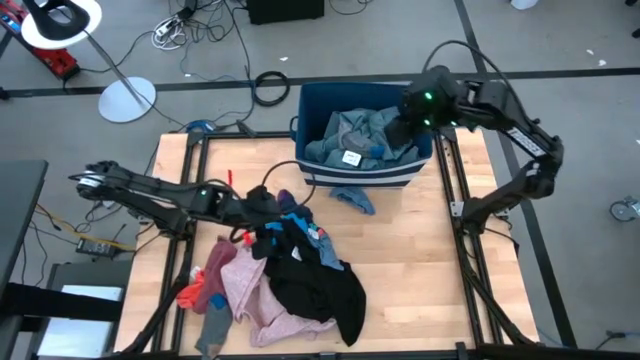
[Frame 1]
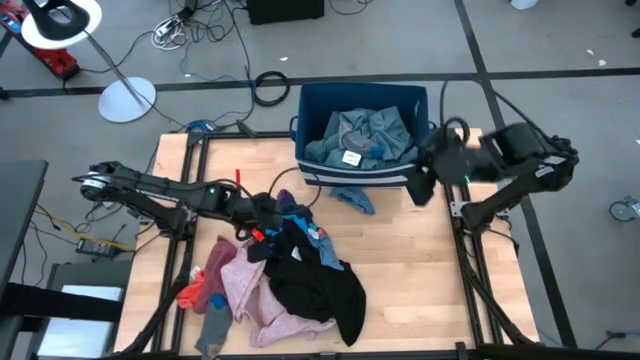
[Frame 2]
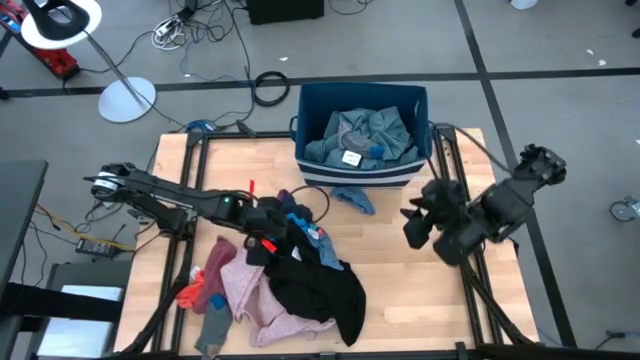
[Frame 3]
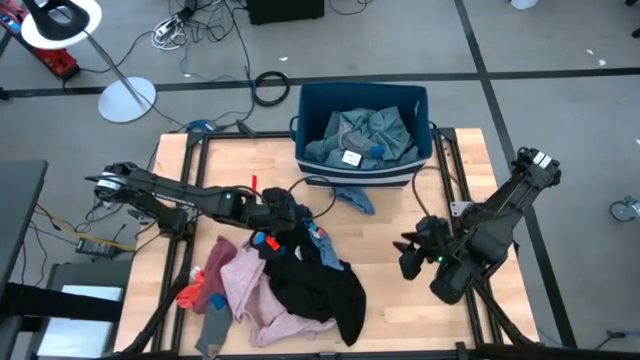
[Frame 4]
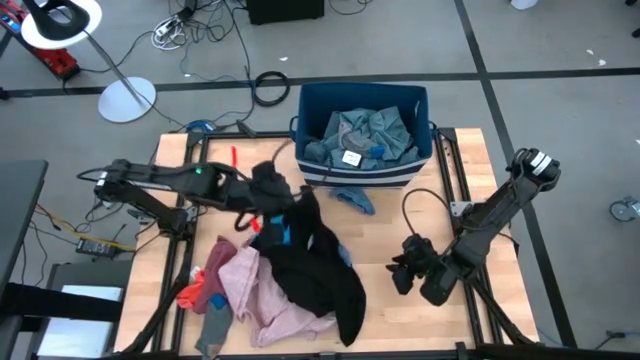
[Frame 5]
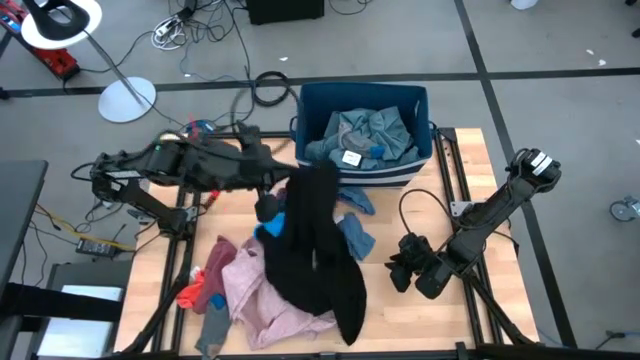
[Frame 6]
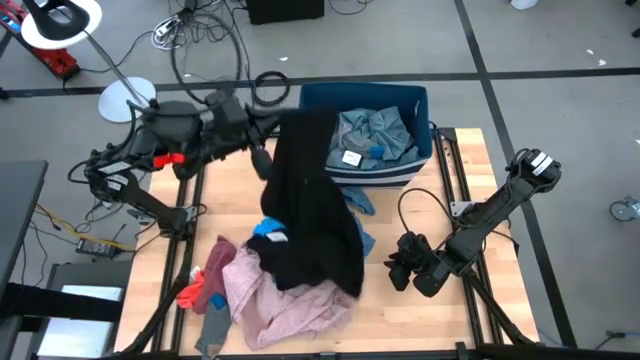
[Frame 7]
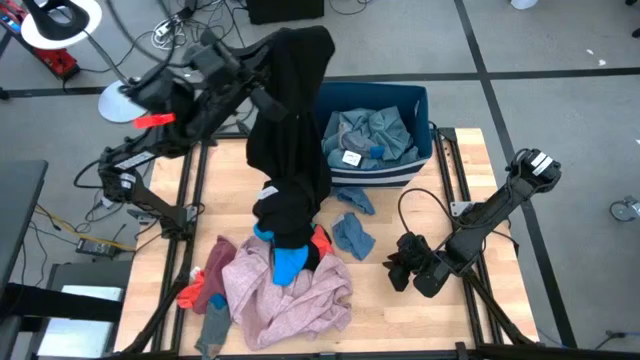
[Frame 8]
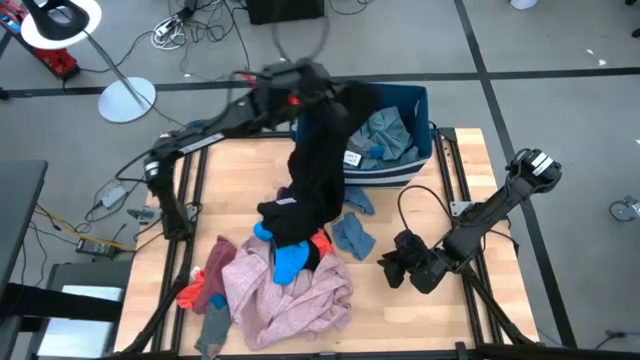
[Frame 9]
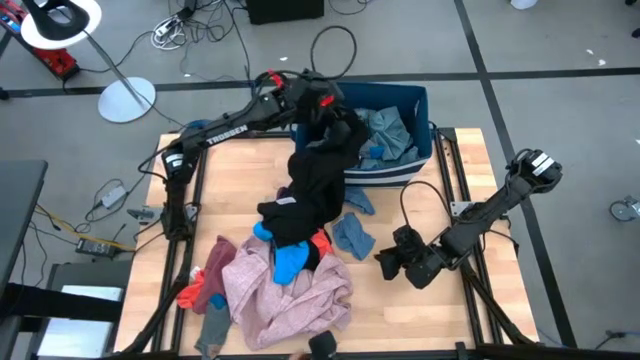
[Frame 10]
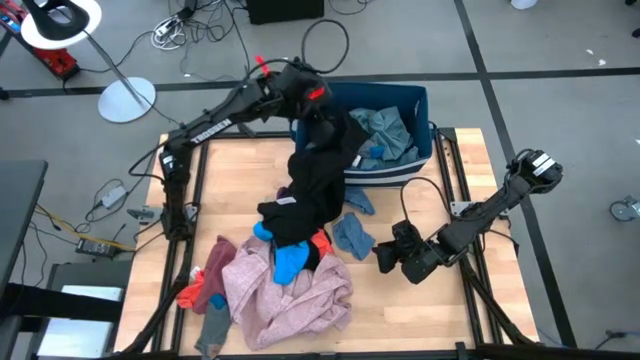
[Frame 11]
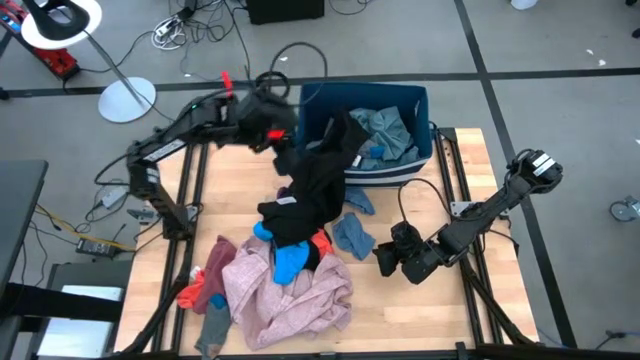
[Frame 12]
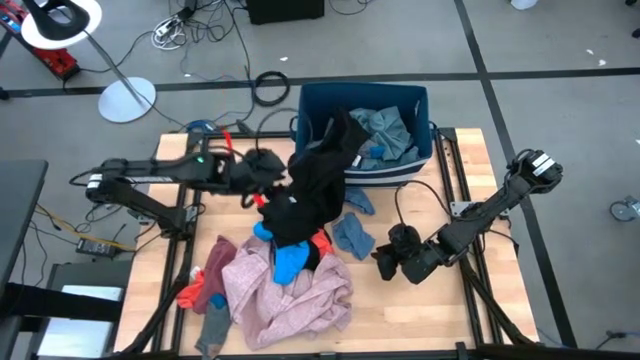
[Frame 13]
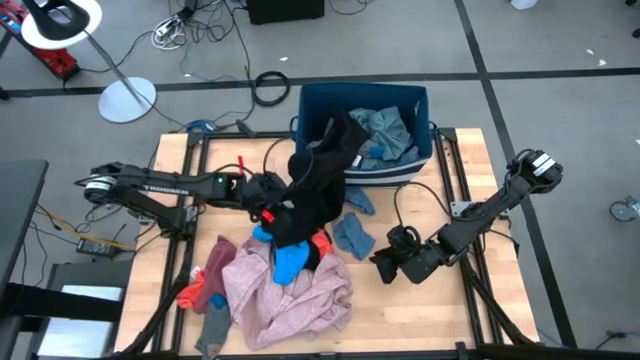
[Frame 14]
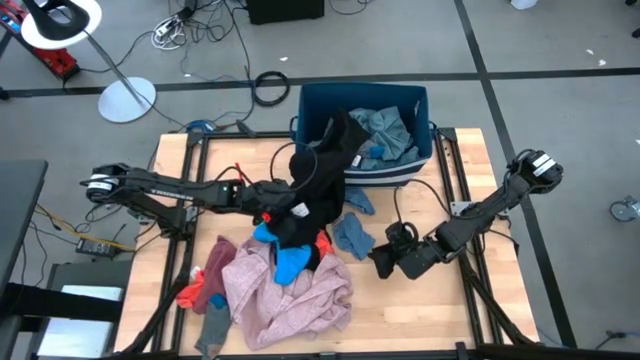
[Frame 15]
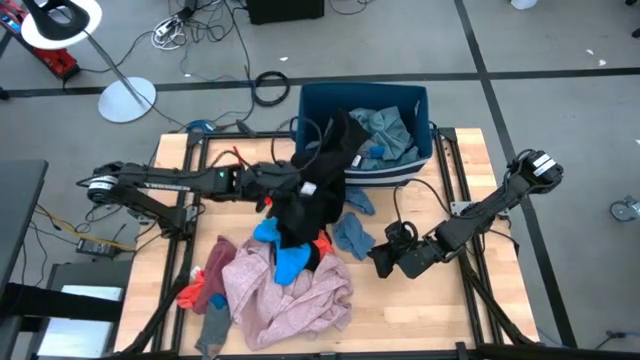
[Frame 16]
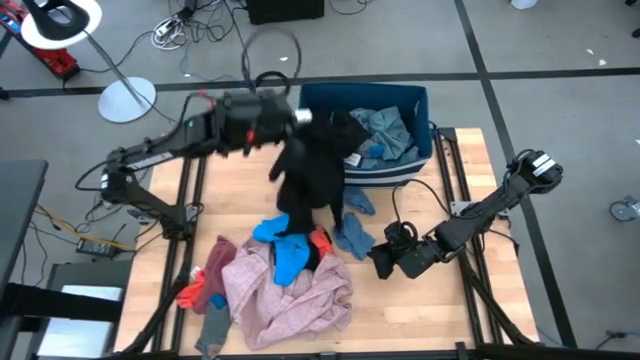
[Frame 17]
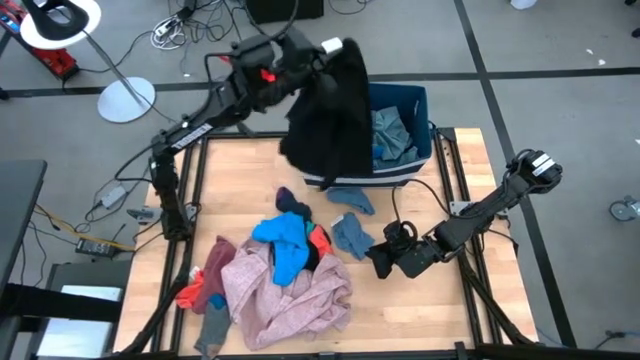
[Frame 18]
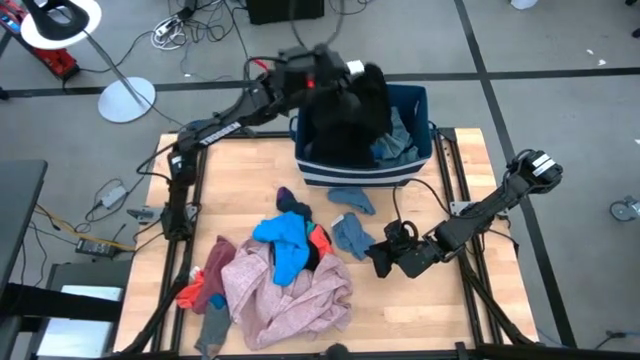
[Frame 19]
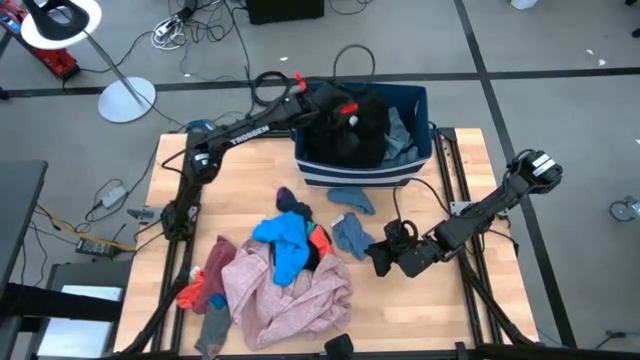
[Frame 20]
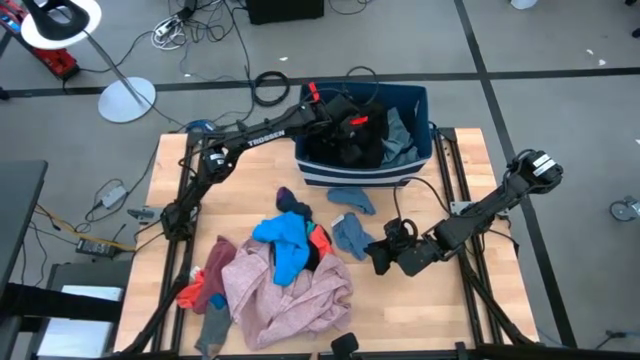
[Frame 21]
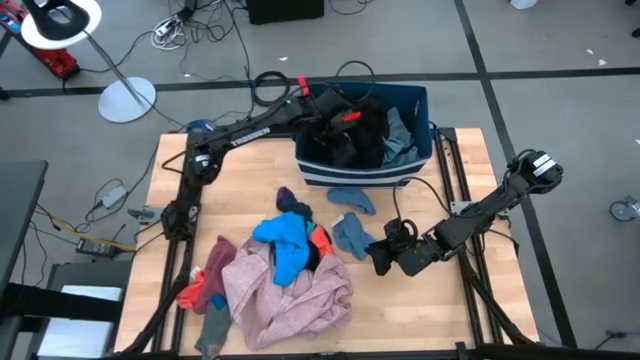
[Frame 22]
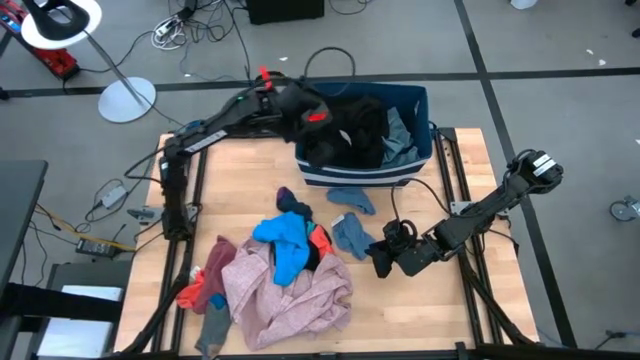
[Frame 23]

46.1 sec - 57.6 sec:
Task: Sort clothes
Put the black polo shirt into the blue bin

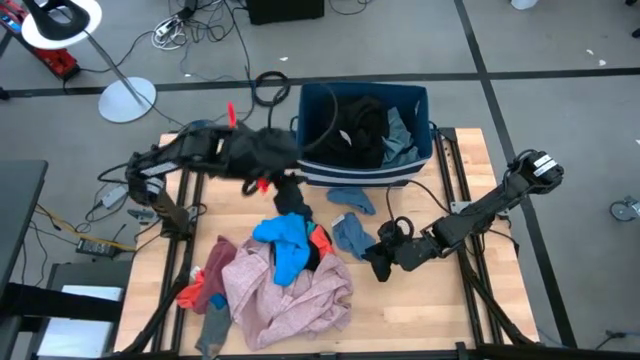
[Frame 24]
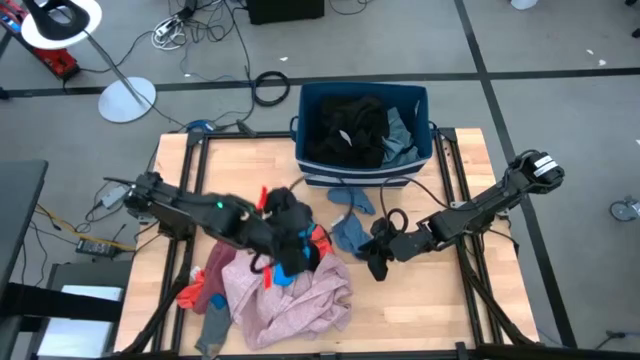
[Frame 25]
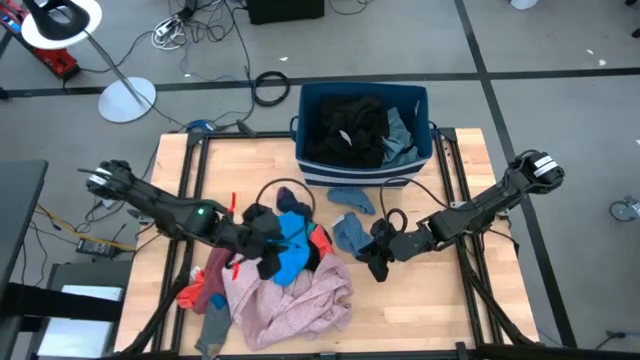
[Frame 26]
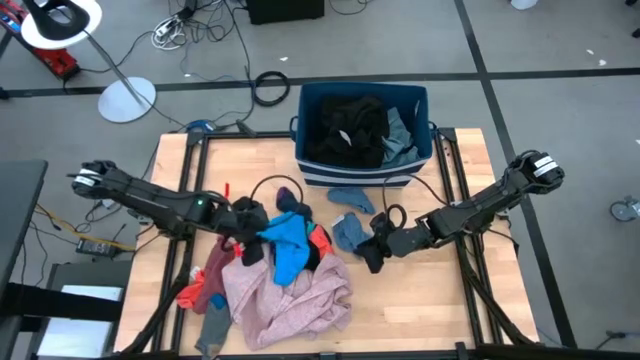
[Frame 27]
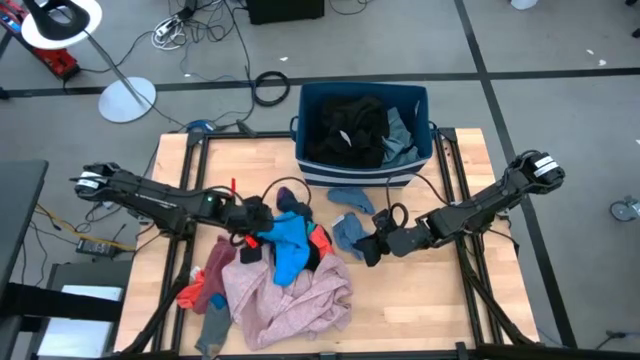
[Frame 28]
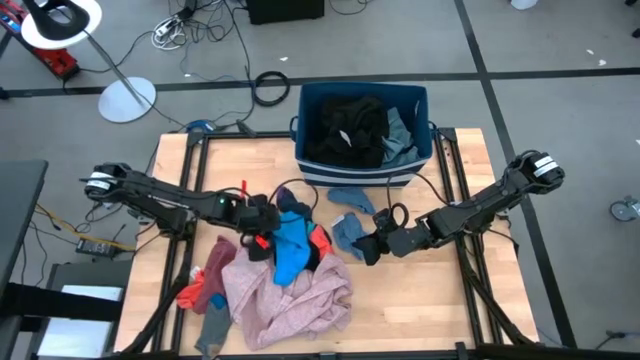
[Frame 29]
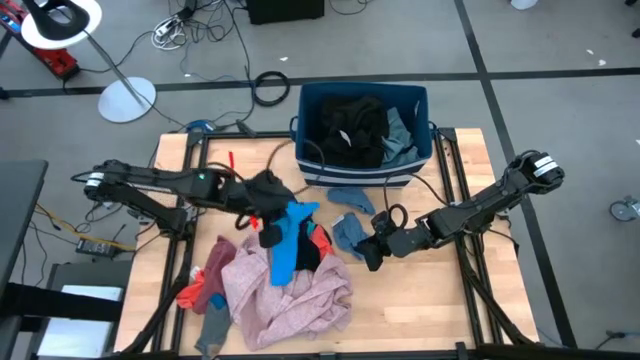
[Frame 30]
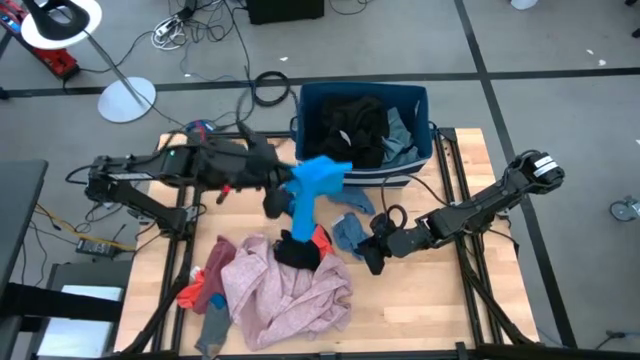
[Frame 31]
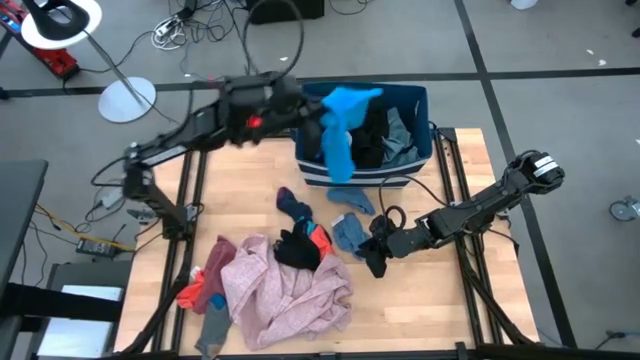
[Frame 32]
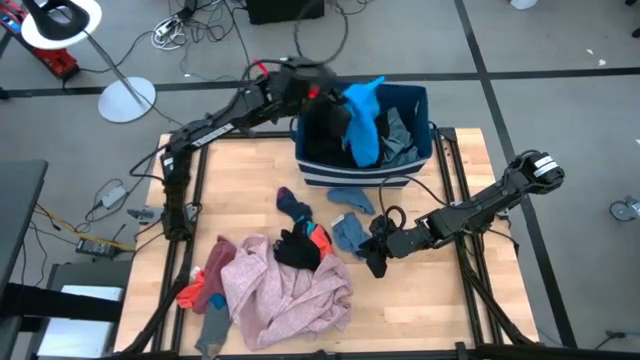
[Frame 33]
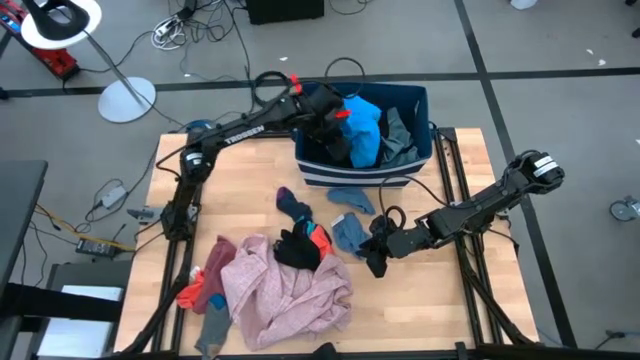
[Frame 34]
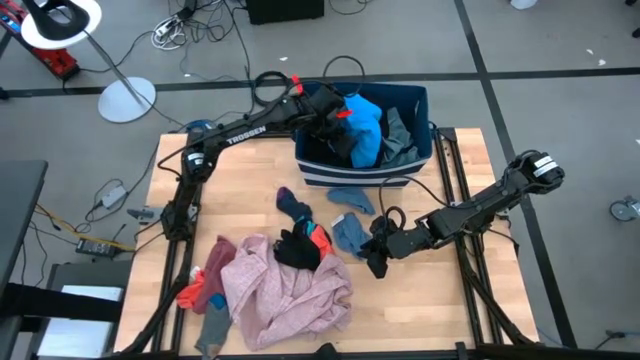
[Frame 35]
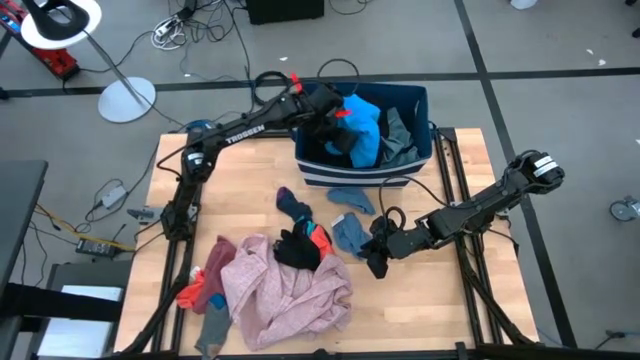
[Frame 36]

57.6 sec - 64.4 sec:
Put the blue boxer into the blue bin

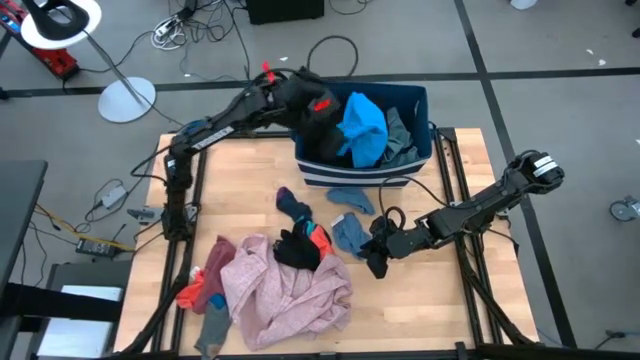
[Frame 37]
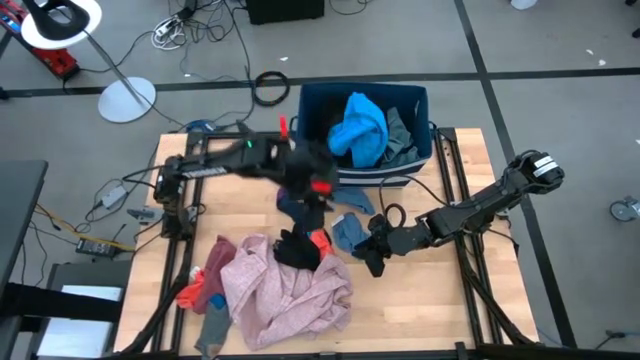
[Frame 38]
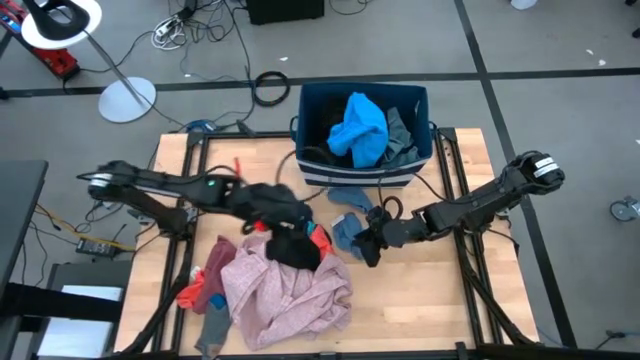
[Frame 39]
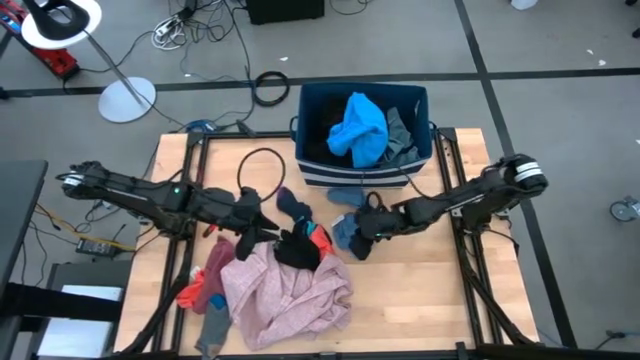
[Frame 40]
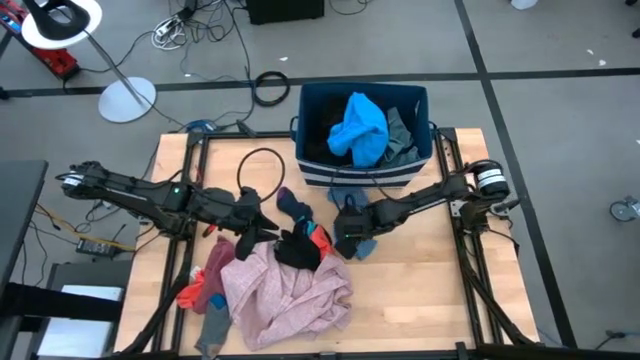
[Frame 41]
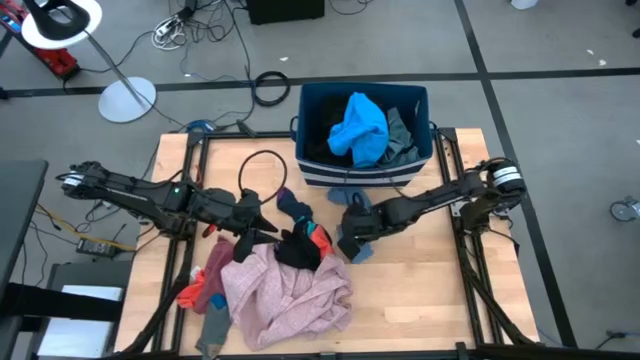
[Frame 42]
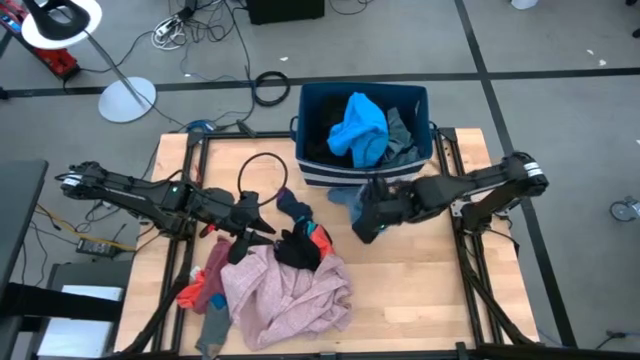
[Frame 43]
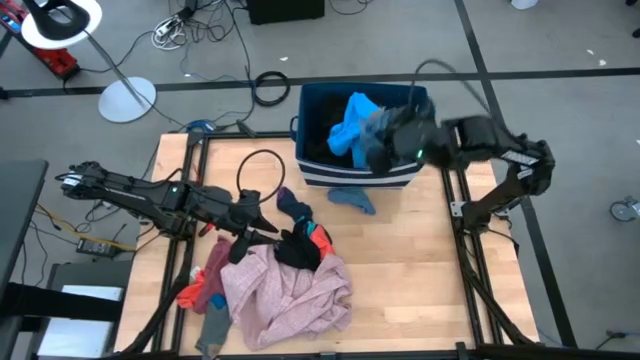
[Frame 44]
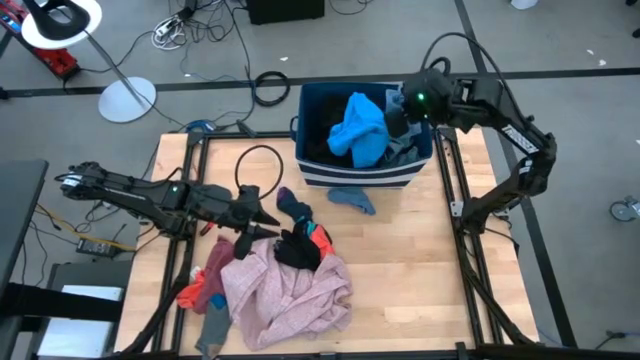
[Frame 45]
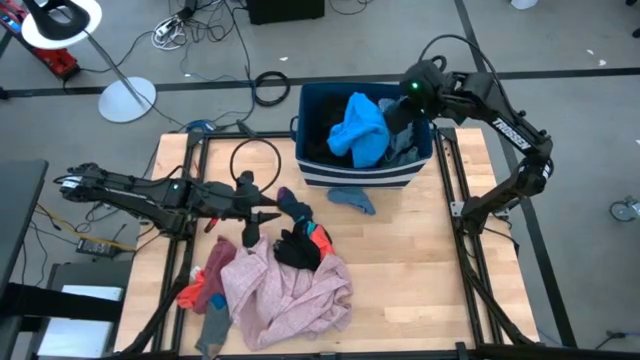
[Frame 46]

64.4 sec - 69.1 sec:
Put the bottom blue socks into the blue bin
